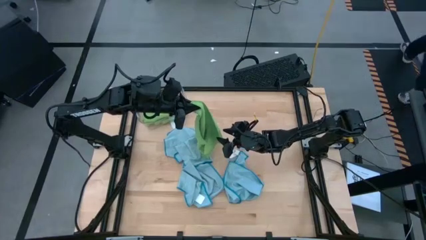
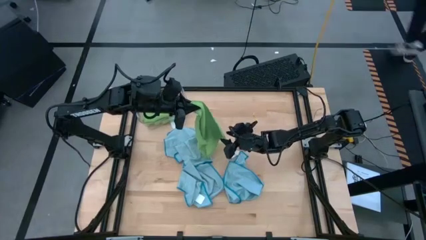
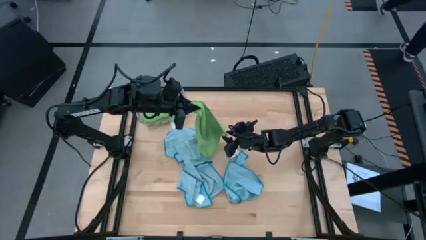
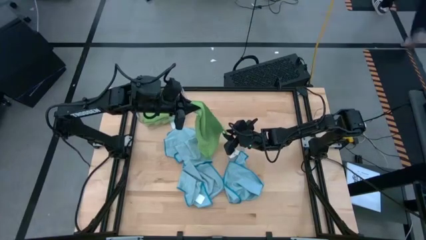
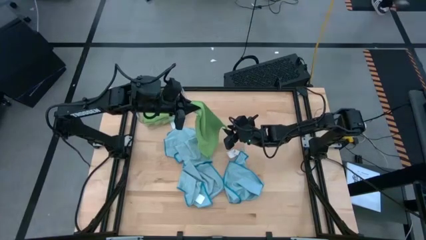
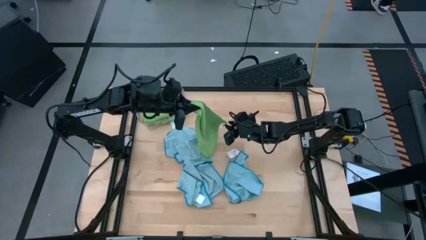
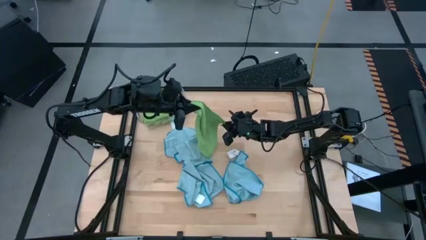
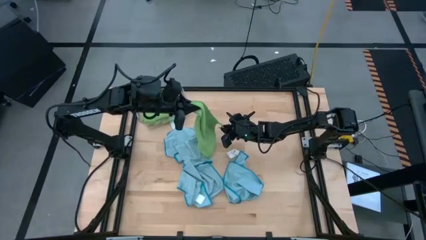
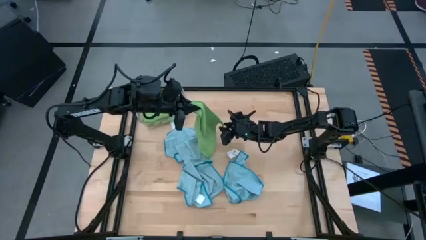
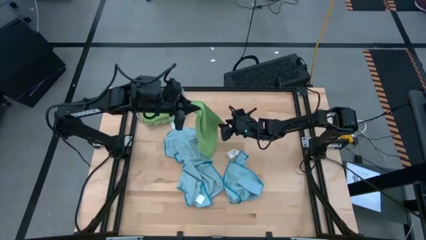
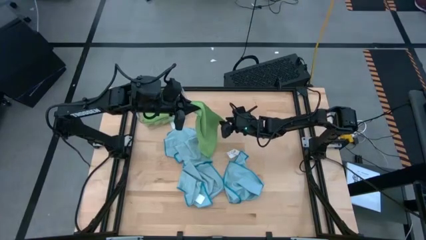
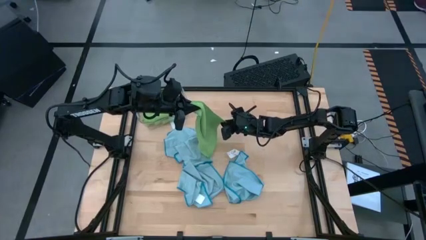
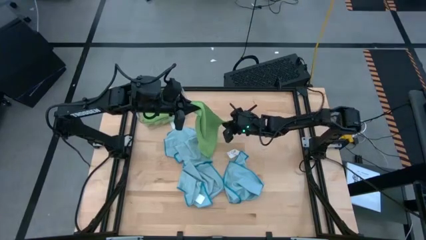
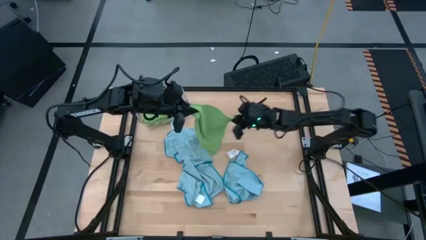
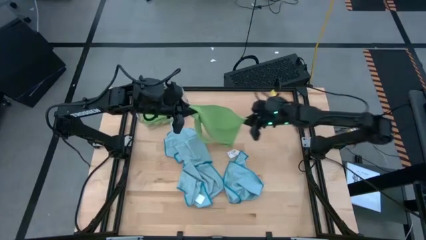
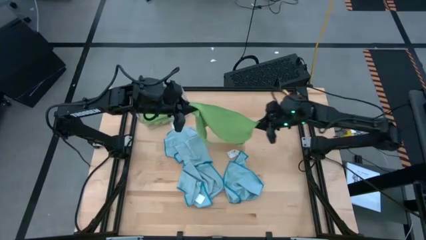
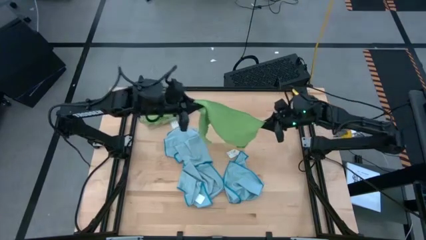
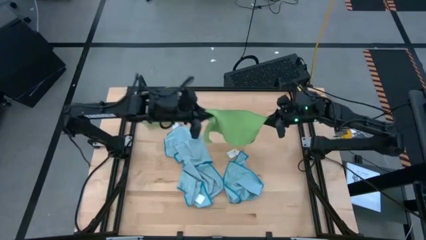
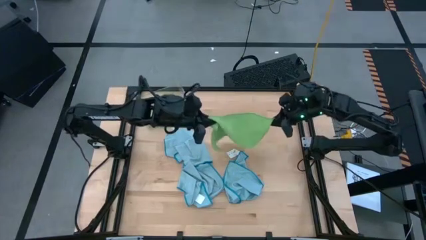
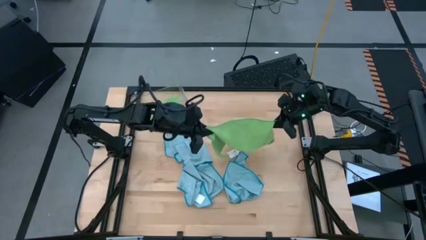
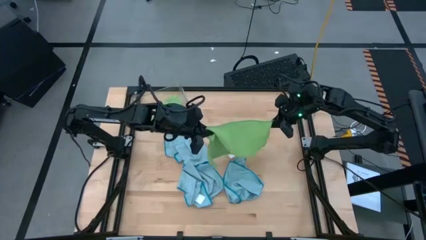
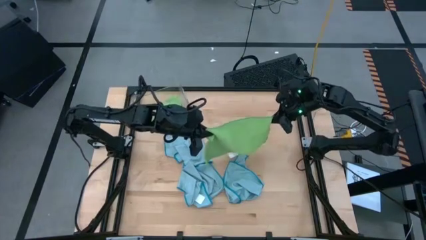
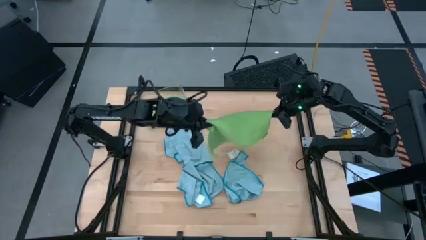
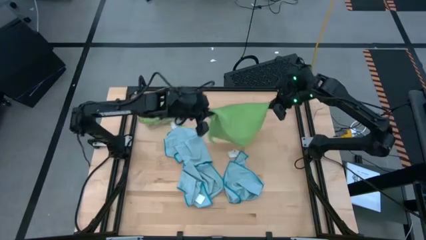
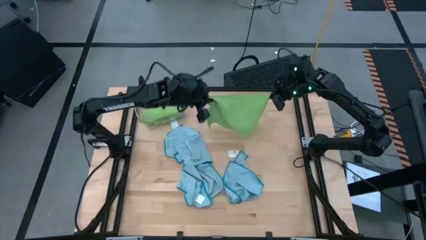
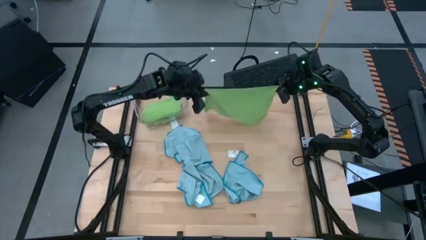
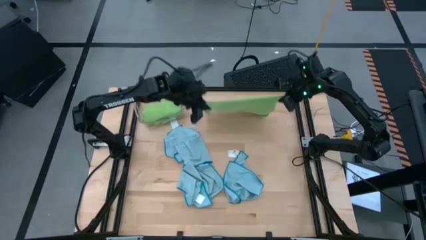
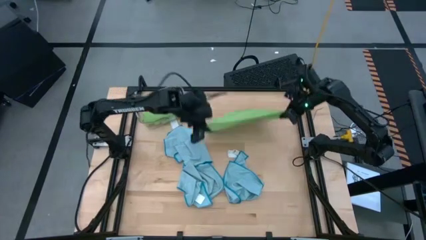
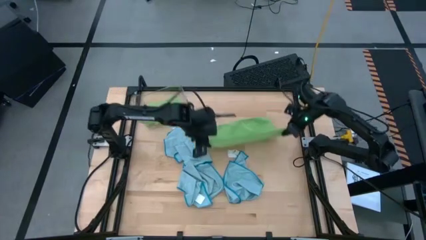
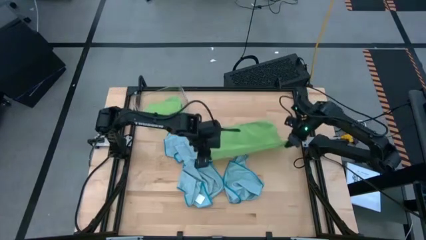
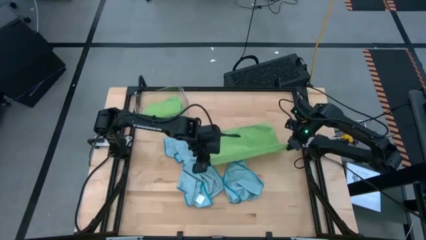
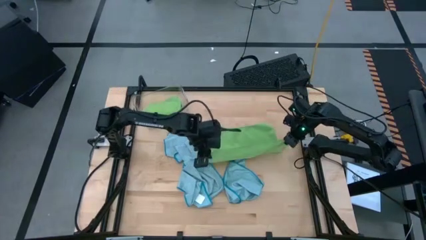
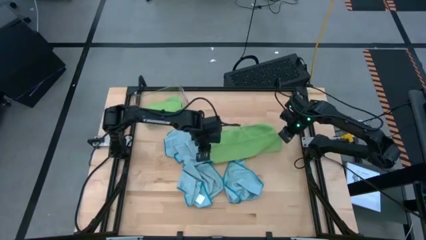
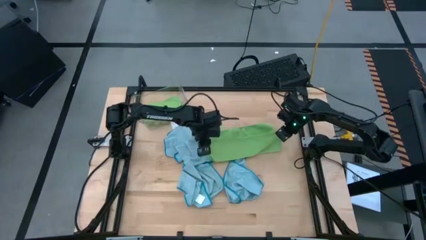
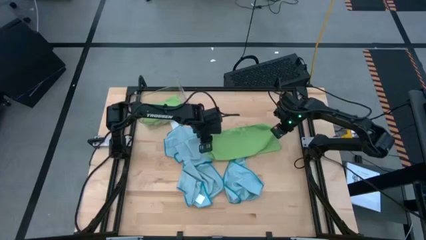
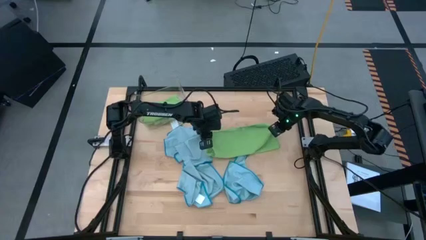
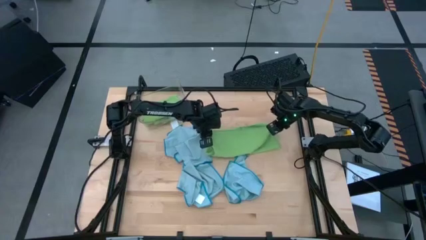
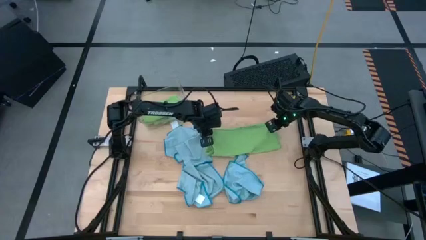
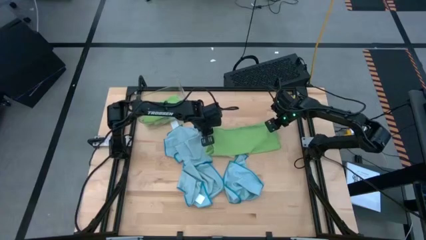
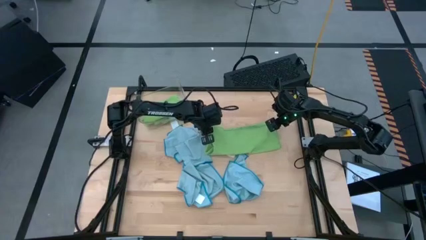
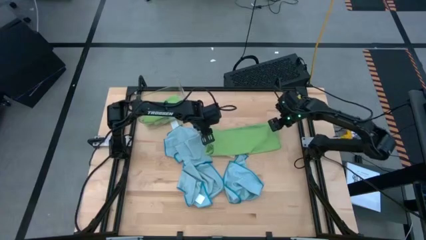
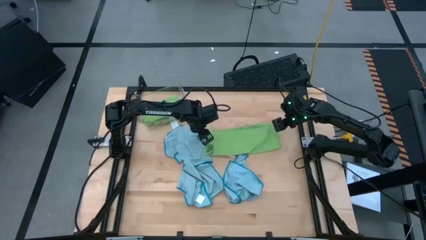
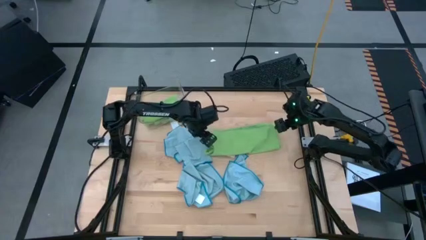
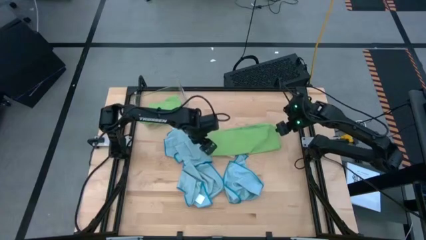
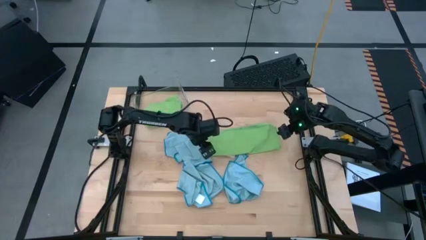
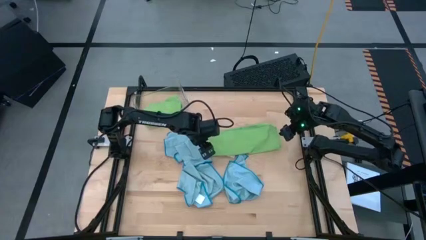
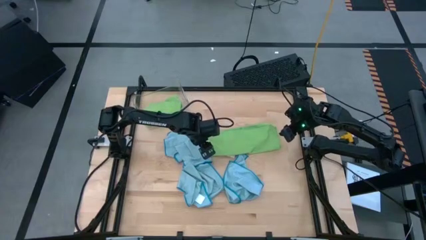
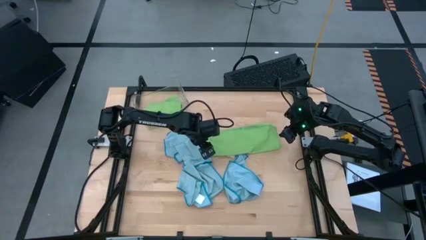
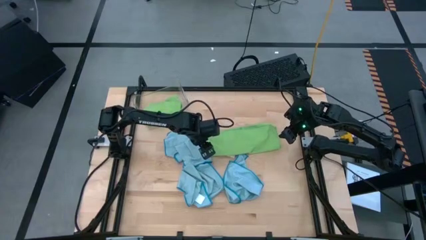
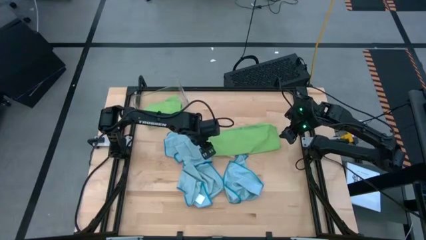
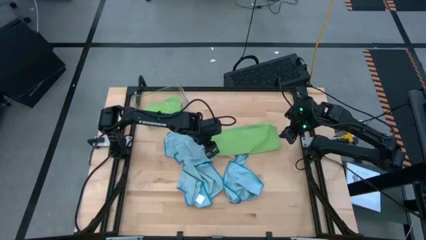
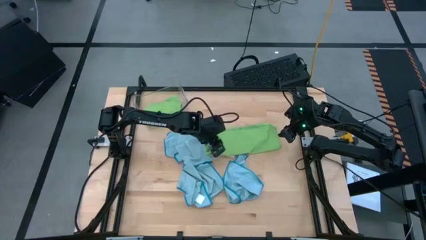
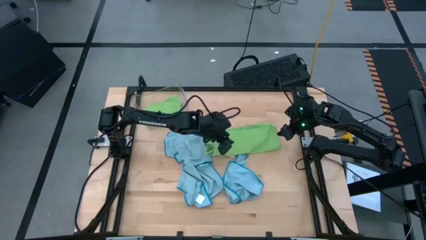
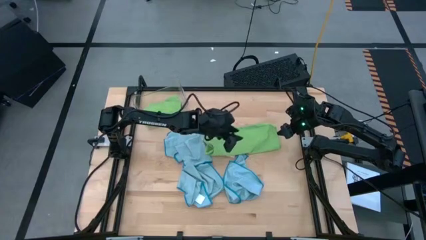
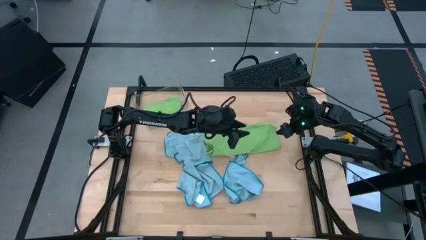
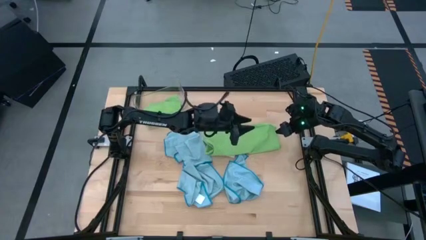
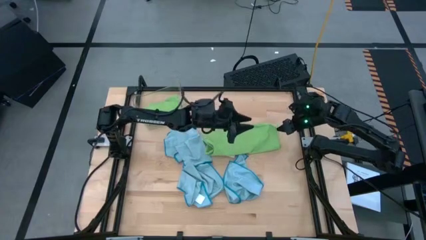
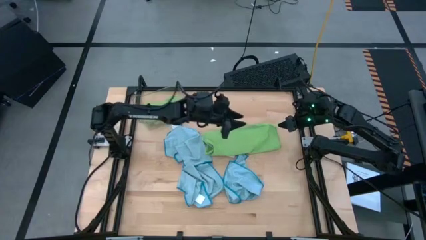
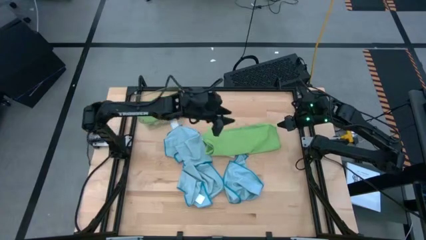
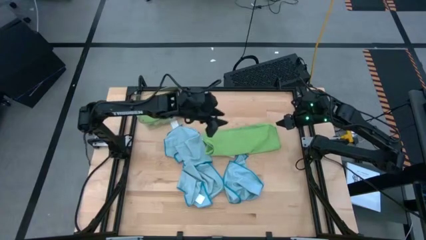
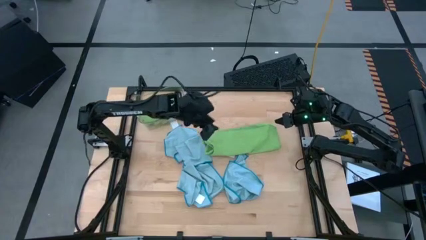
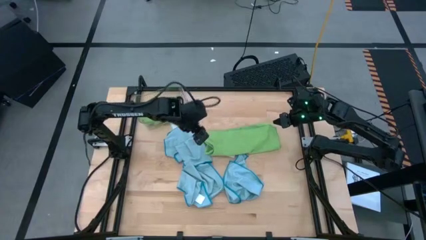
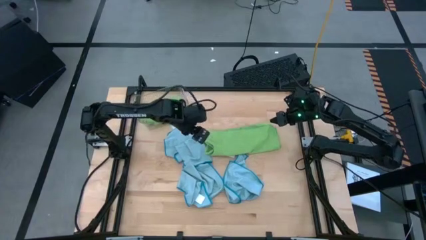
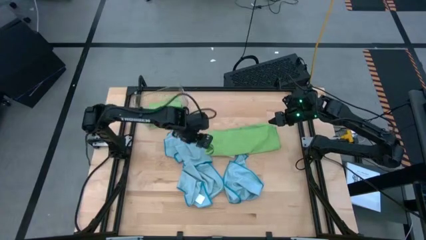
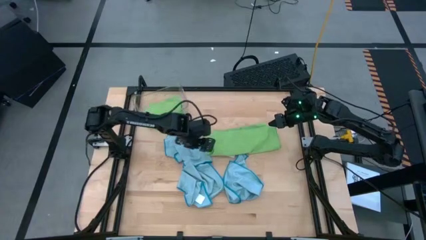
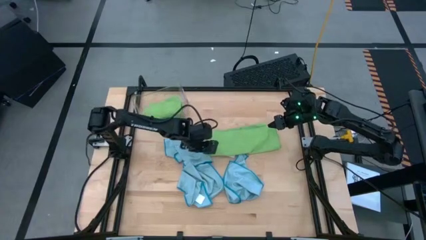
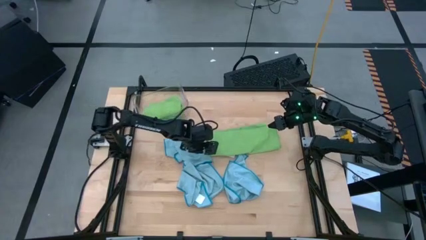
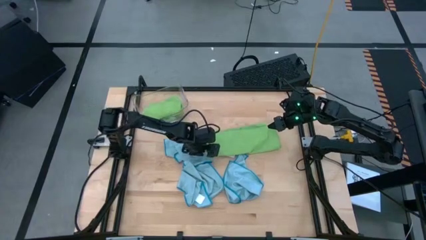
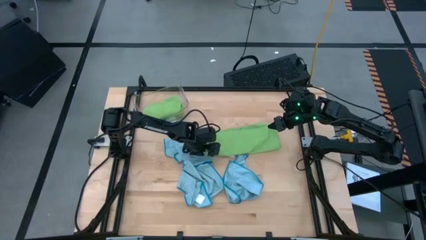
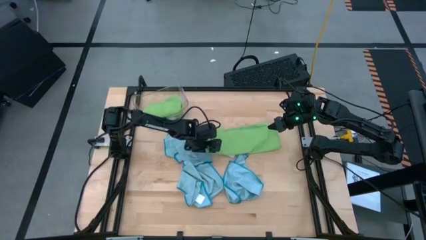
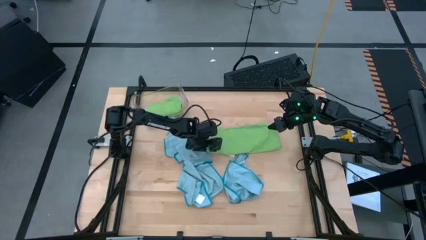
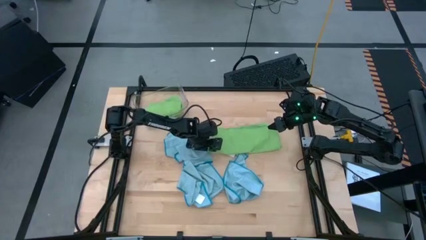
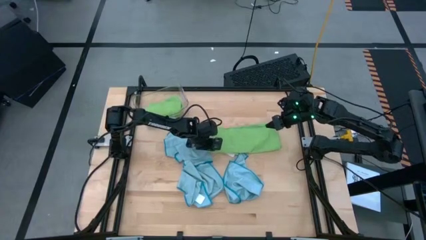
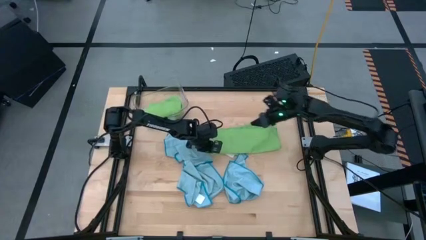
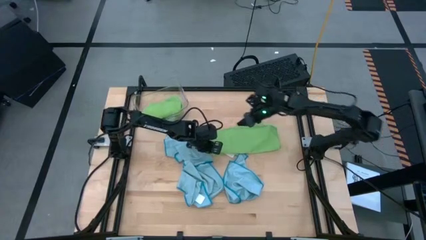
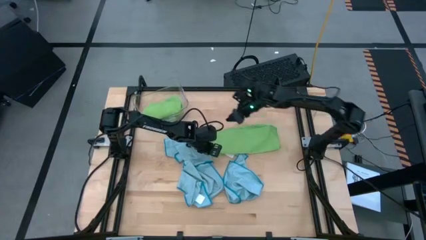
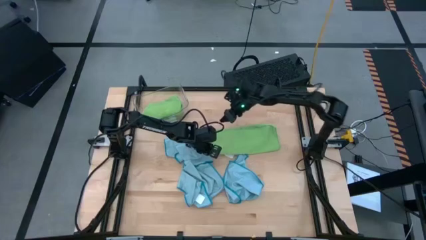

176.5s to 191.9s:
Task: Fold microfiber towels
Fold the green microfiber cloth

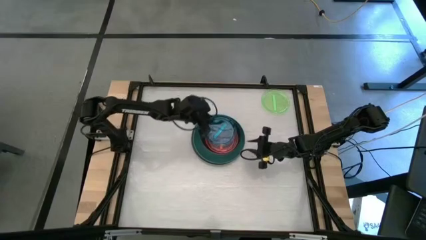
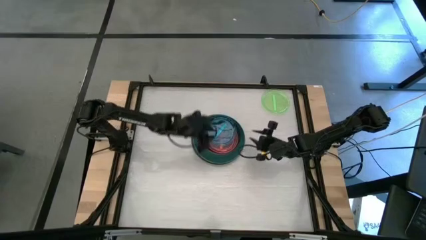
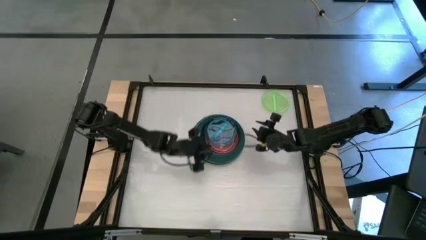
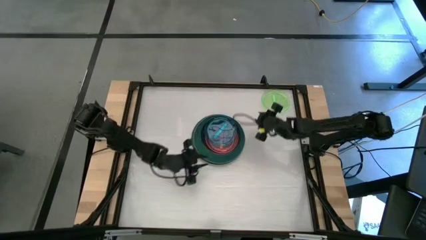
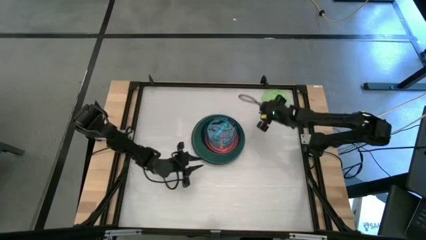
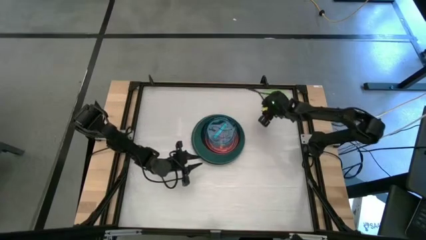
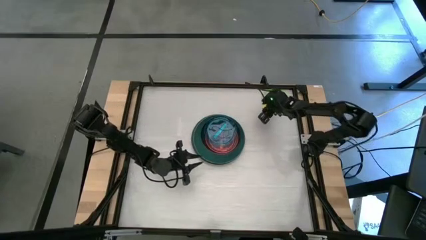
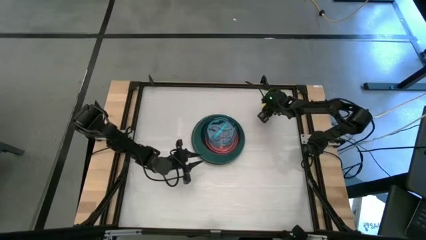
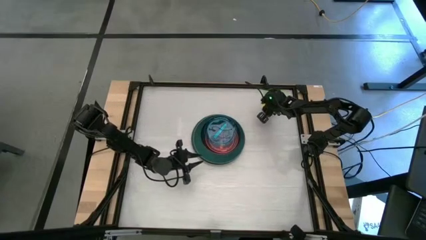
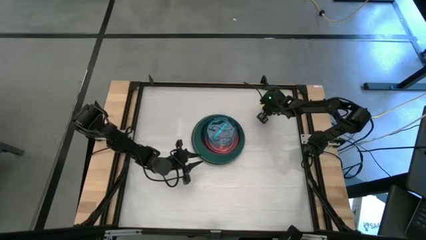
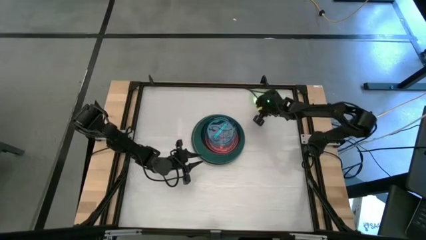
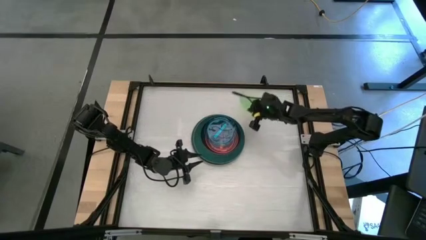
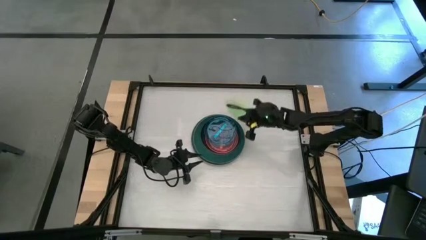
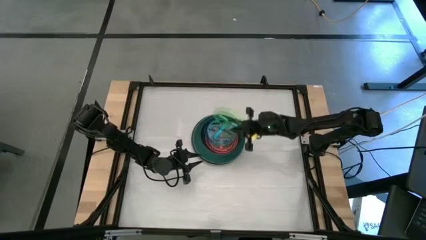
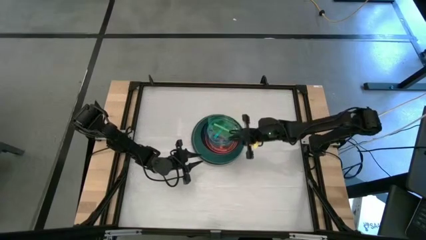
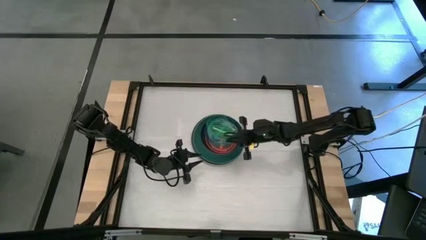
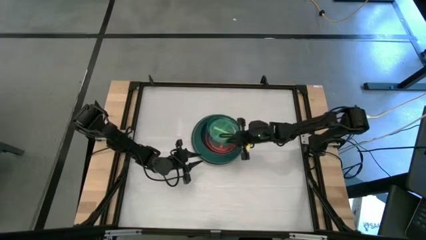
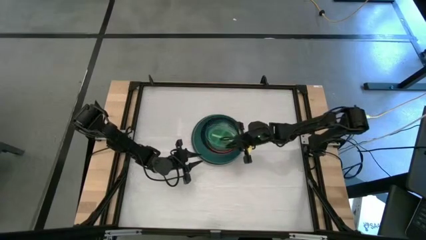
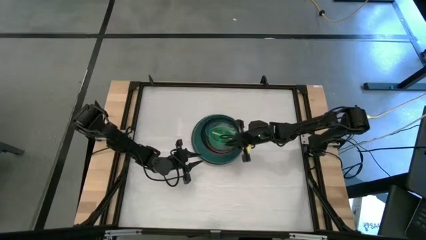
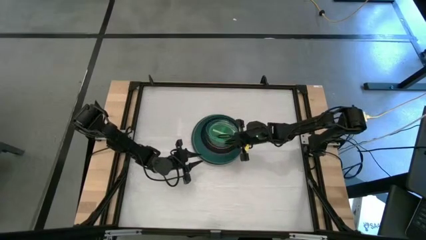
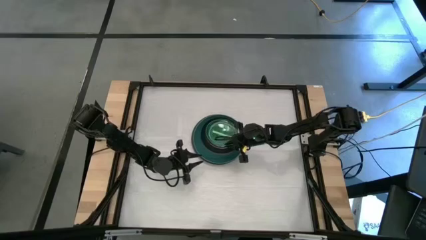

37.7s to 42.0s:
Task: Stack plastic plates
Stack the transparent green plate on top of the transparent blue plate
